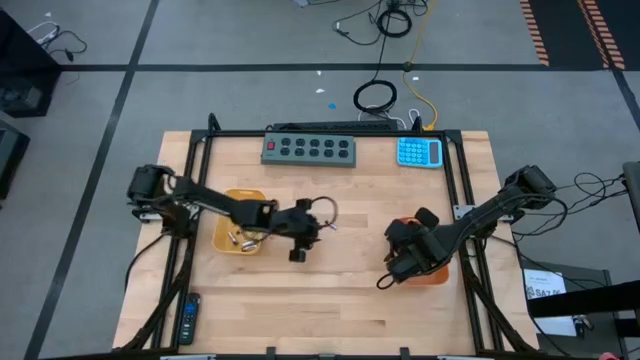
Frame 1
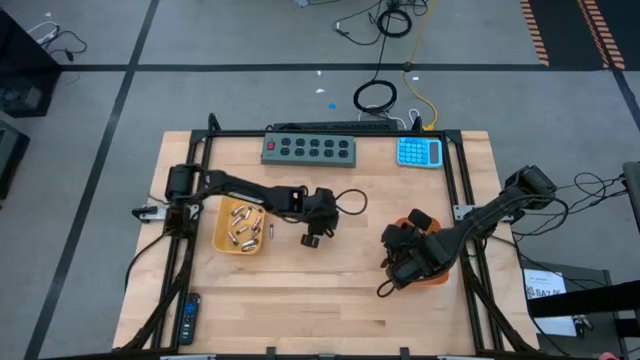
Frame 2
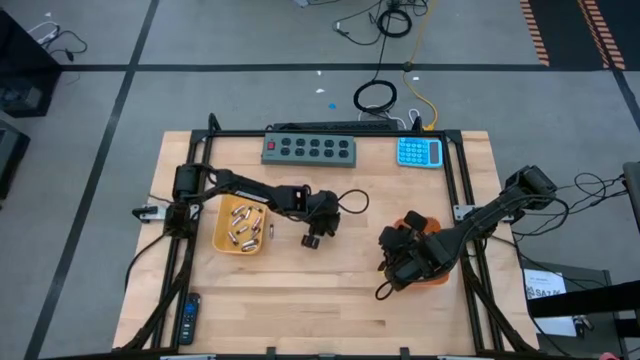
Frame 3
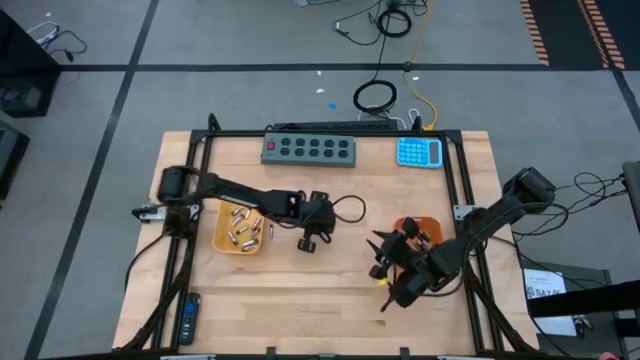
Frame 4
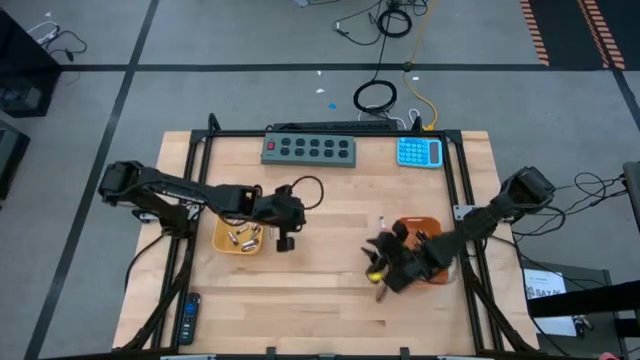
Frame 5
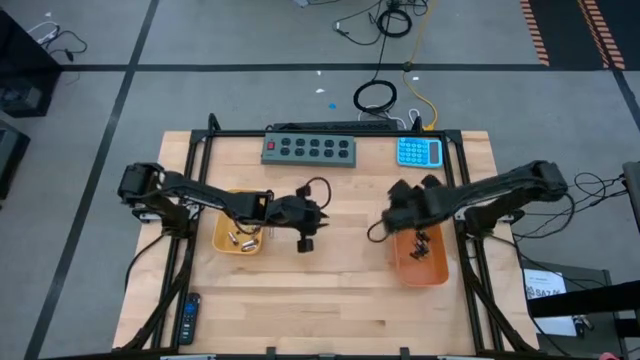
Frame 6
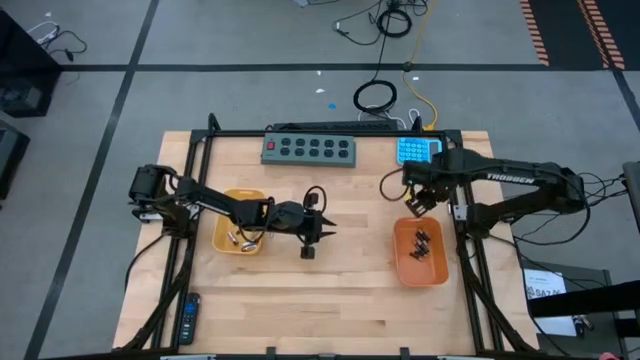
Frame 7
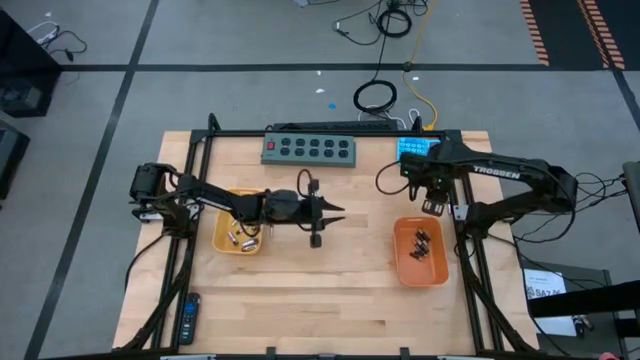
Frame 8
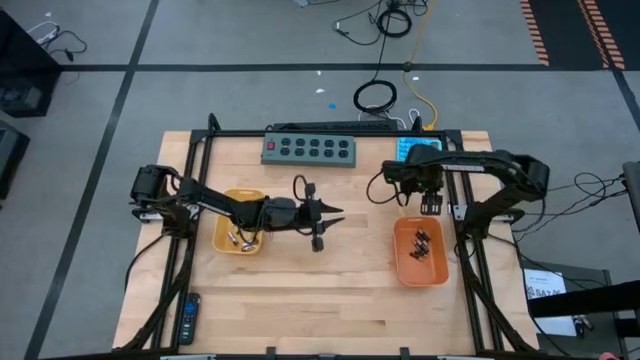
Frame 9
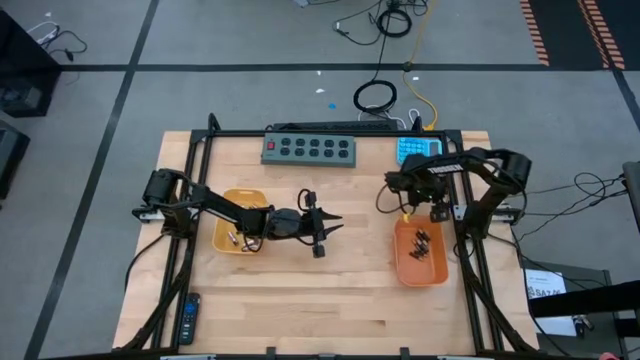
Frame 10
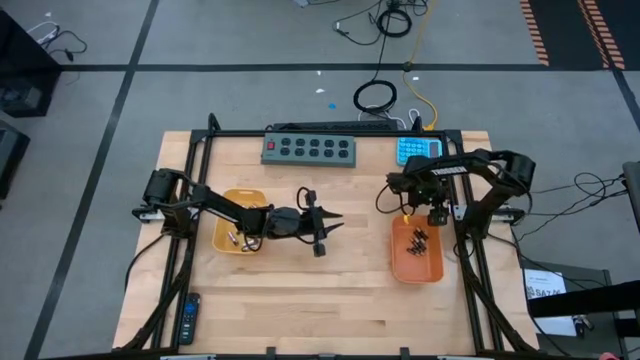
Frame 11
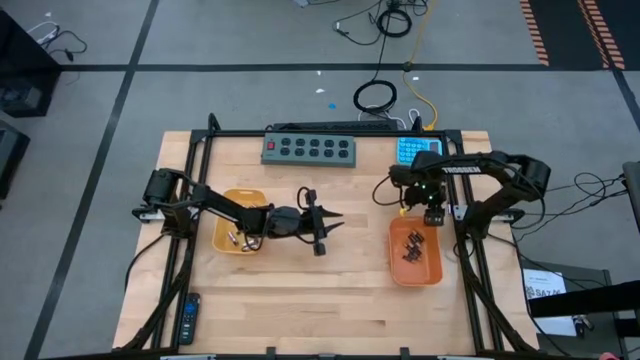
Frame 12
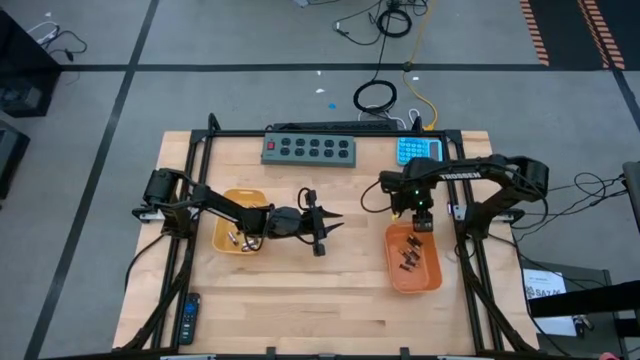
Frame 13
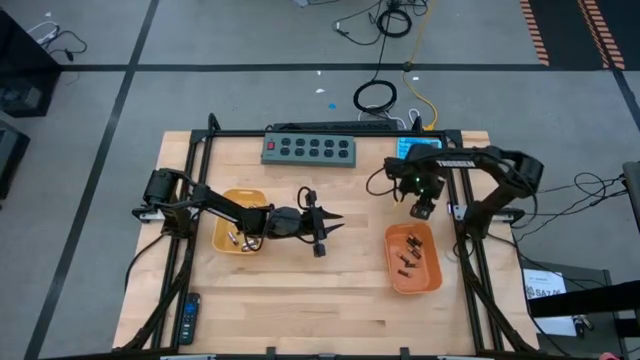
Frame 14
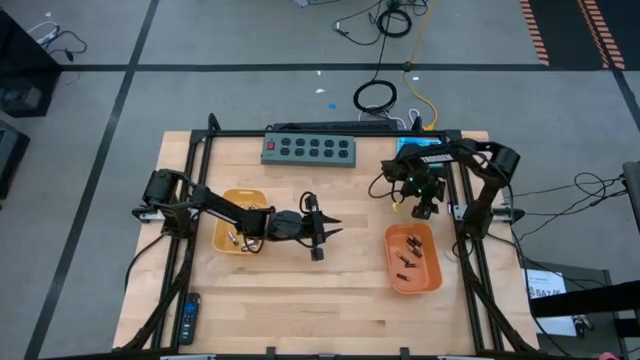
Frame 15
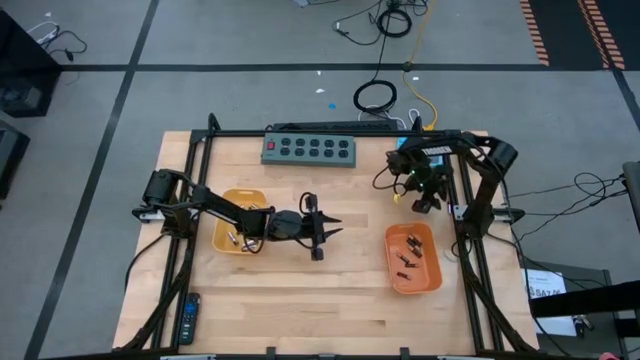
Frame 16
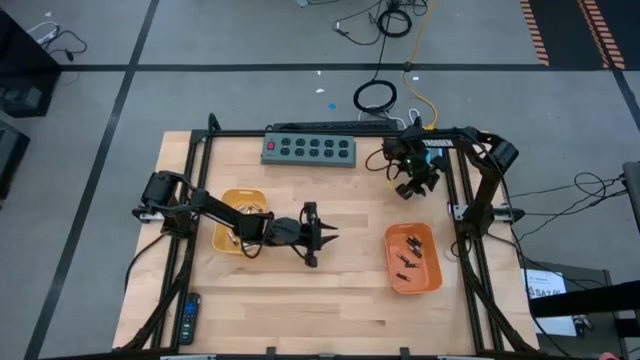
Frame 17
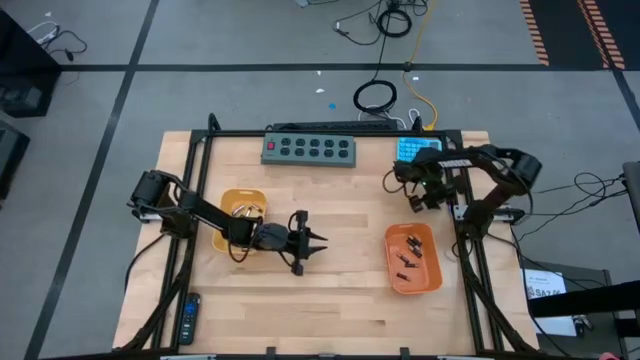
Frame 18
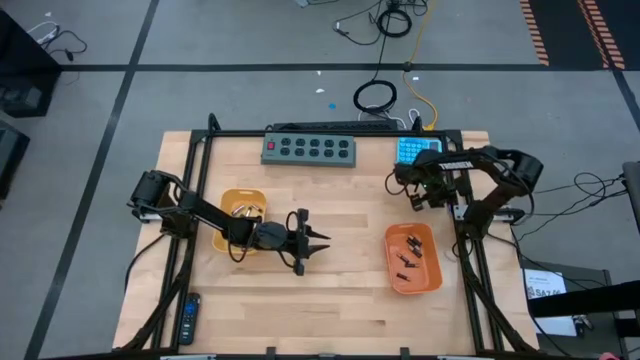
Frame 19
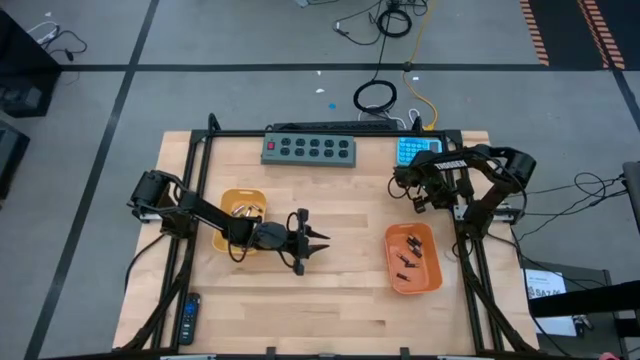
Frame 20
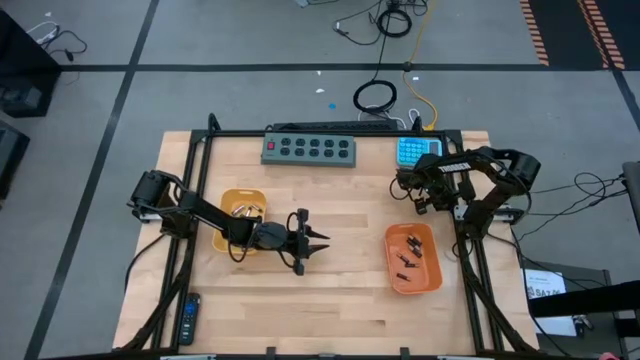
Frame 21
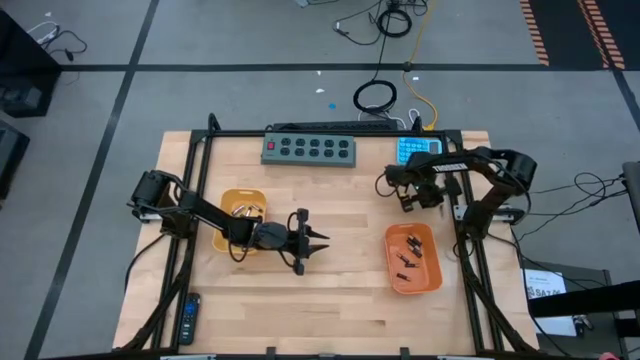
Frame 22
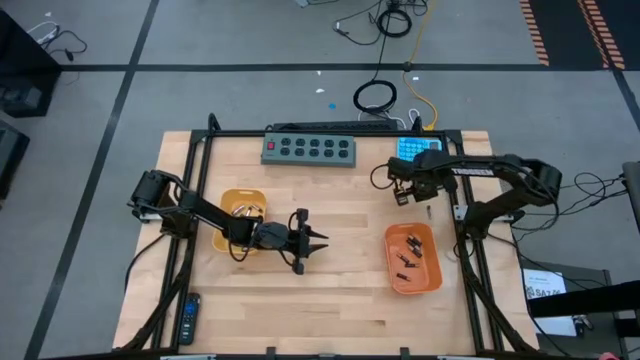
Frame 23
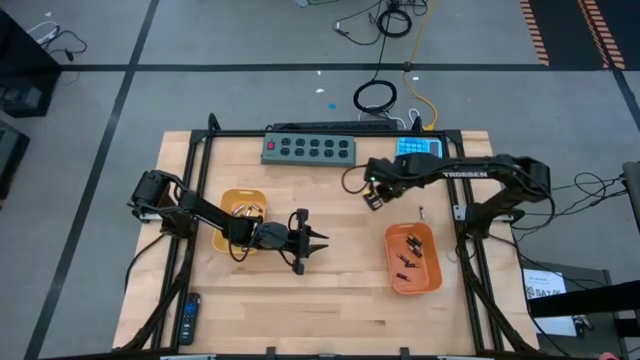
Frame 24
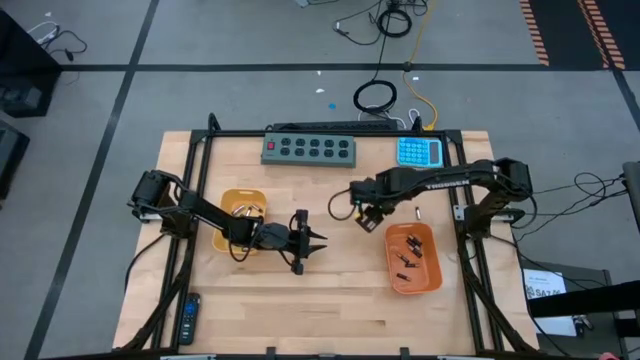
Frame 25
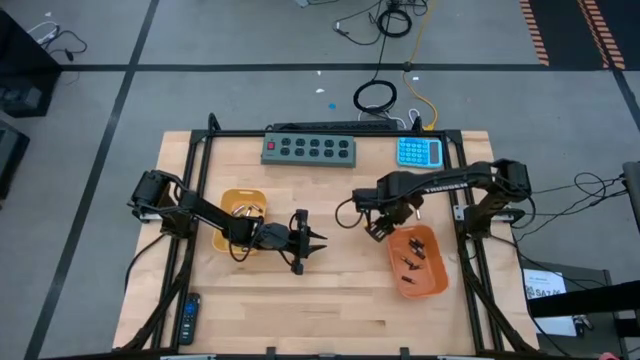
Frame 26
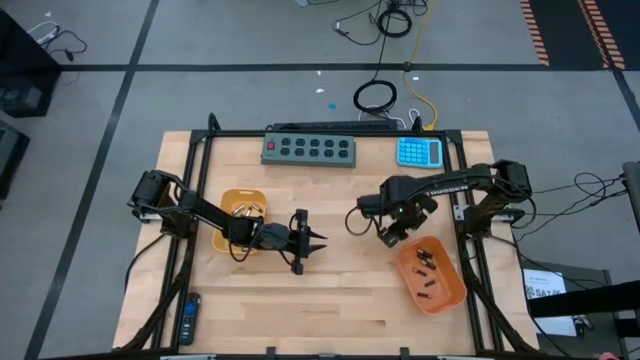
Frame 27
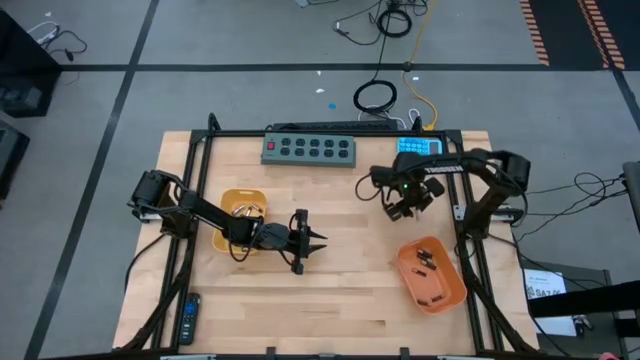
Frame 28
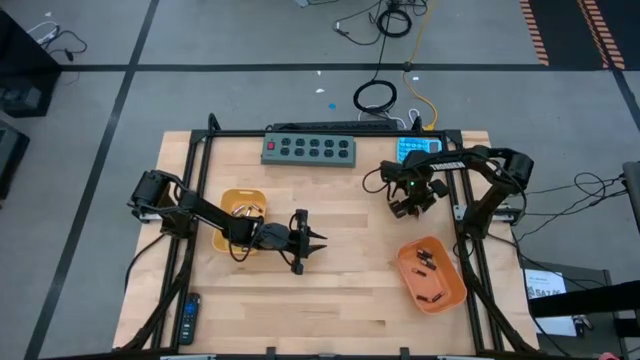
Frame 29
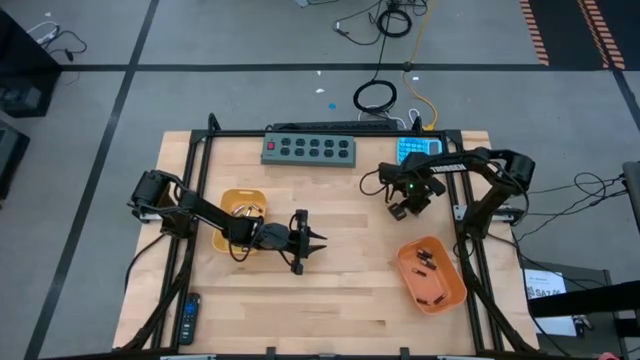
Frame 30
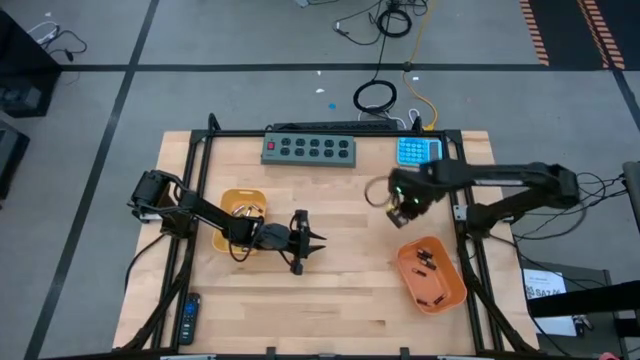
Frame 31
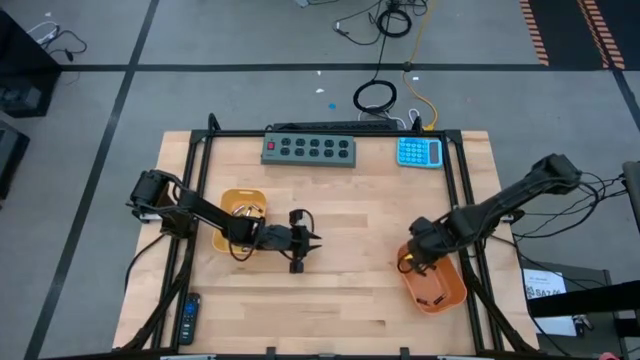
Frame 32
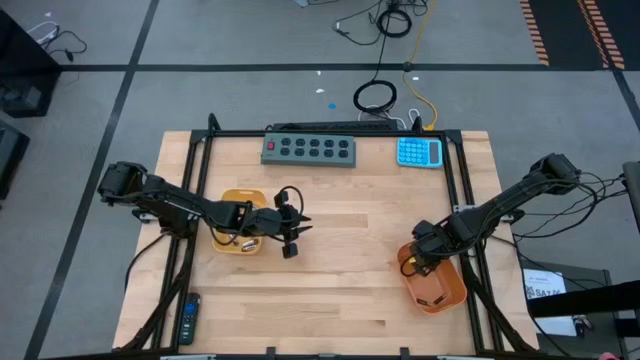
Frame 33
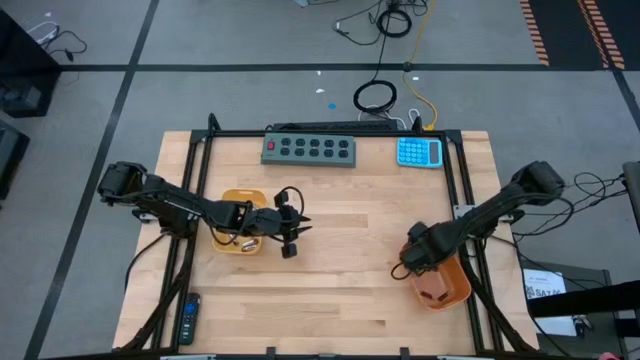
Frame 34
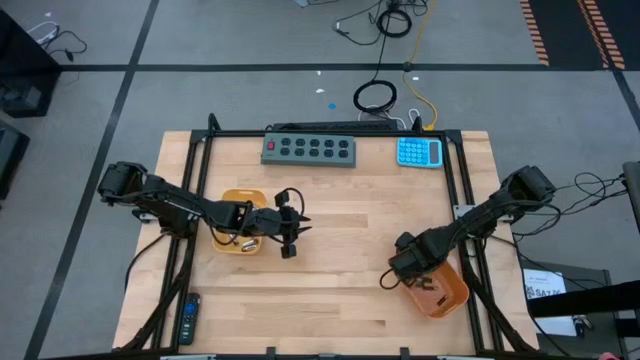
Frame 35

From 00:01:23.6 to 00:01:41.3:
Task: Sort batteries
Put the silver battery into the yellow bin

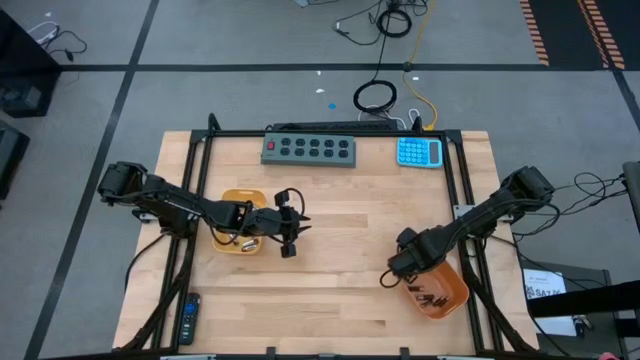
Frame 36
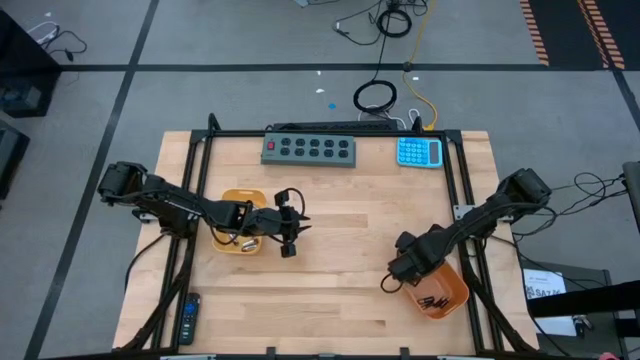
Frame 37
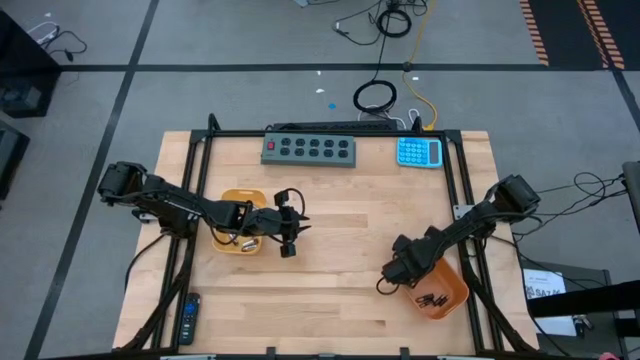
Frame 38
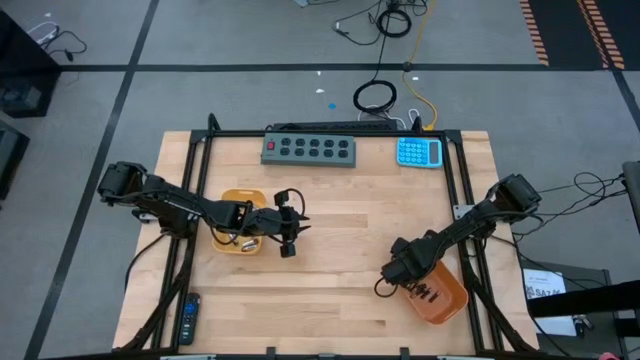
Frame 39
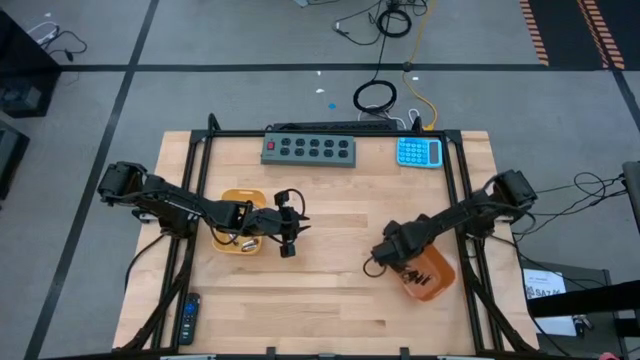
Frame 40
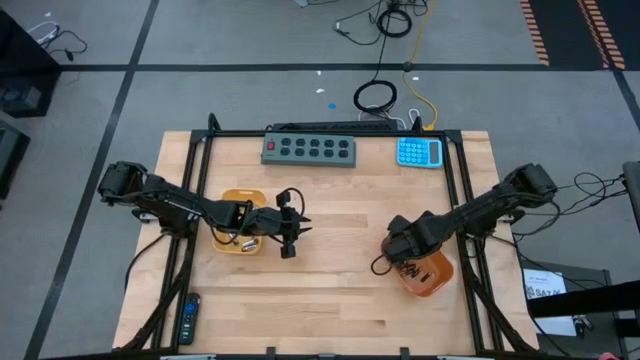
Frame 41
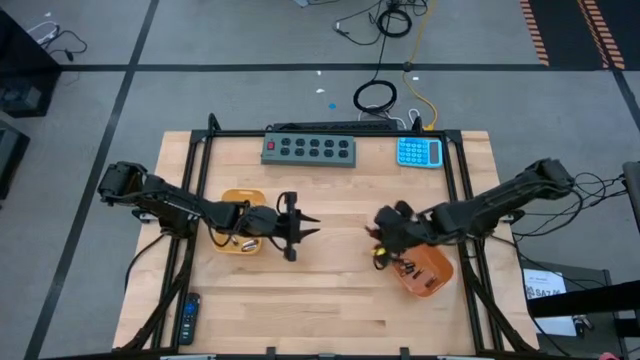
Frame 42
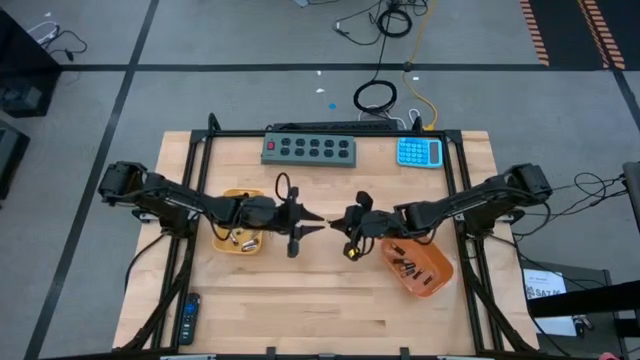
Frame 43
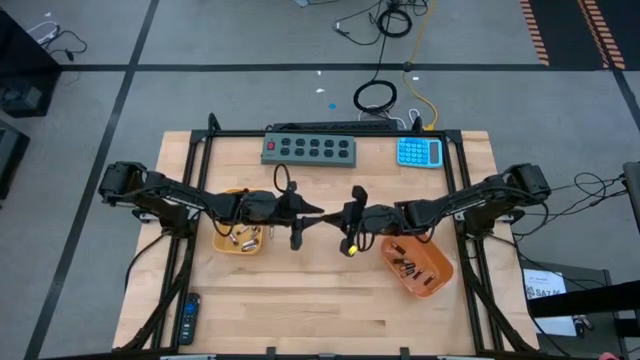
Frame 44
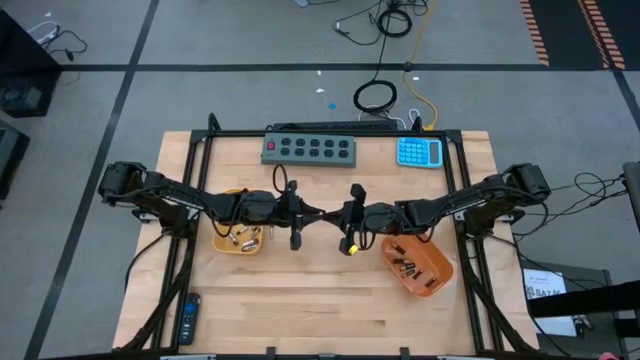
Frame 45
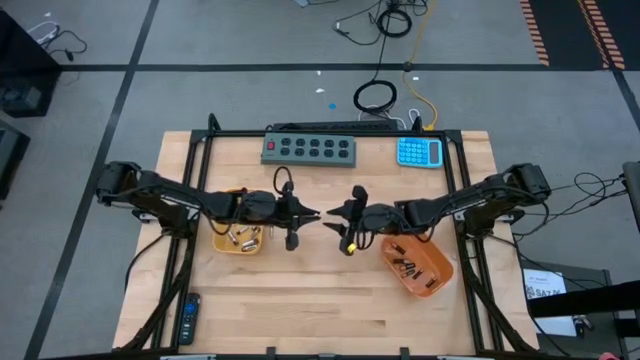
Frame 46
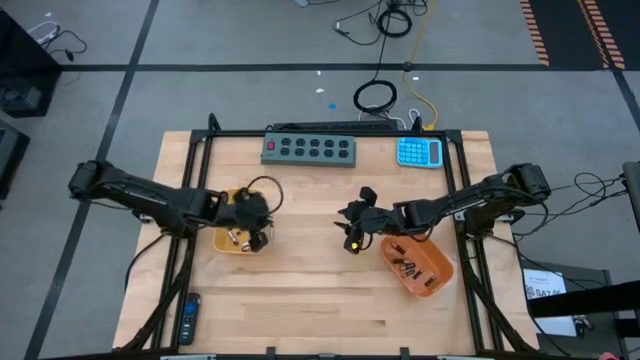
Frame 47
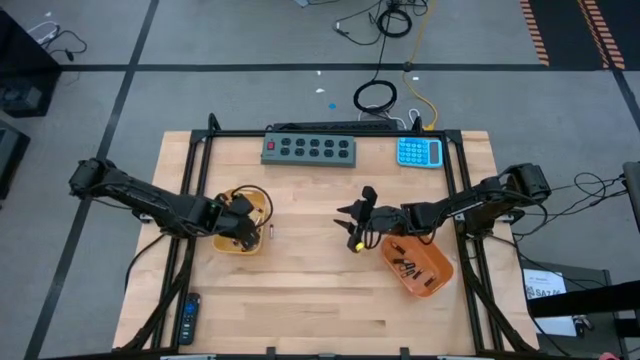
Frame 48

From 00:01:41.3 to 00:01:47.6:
Put the silver battery into the yellow bin
